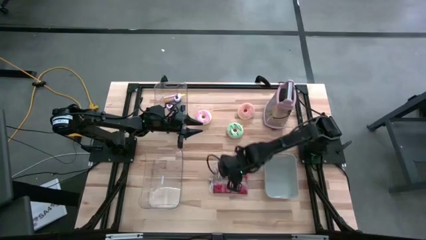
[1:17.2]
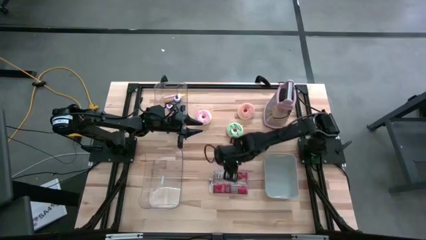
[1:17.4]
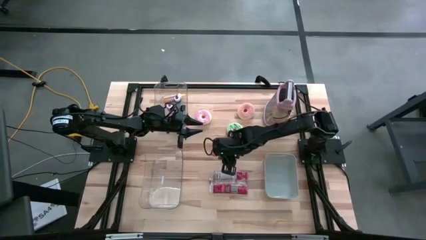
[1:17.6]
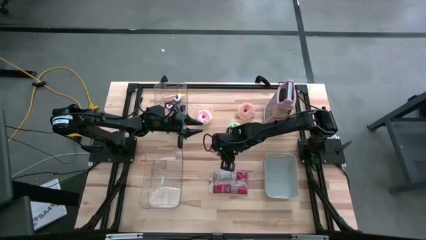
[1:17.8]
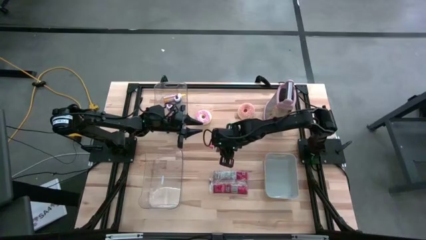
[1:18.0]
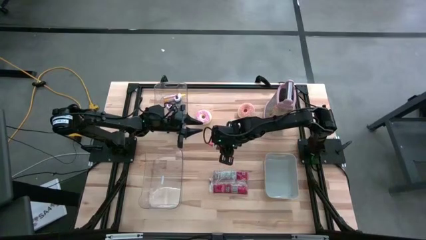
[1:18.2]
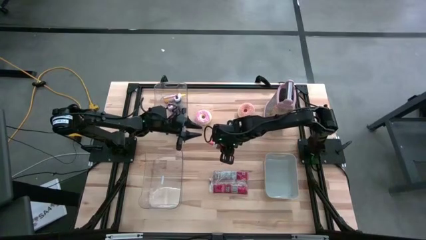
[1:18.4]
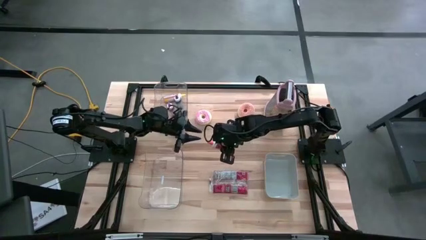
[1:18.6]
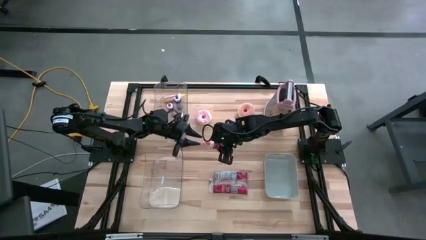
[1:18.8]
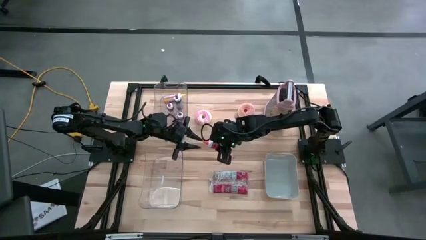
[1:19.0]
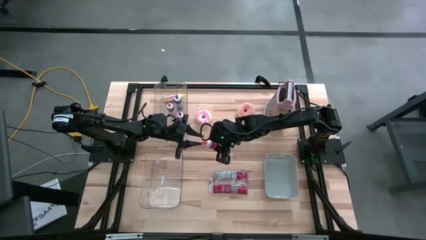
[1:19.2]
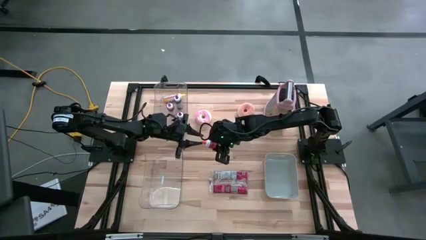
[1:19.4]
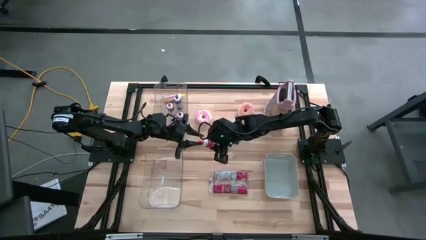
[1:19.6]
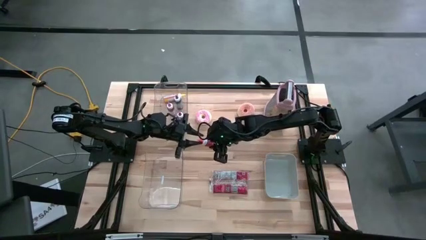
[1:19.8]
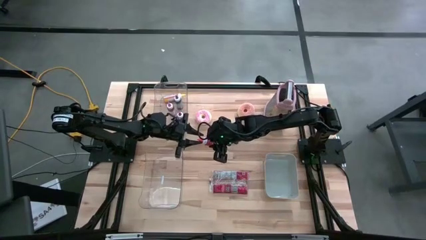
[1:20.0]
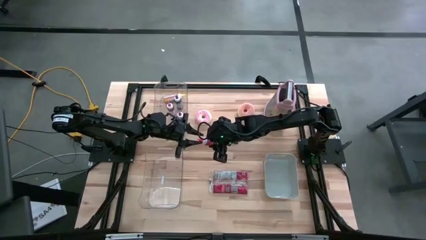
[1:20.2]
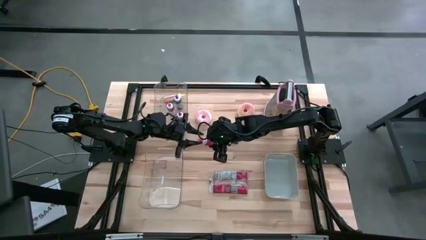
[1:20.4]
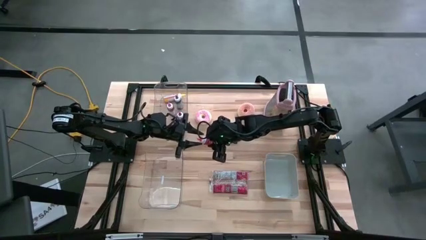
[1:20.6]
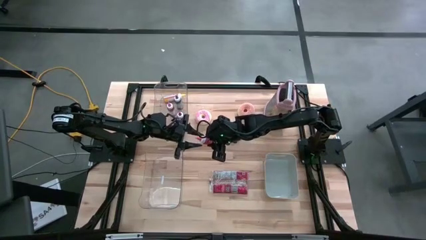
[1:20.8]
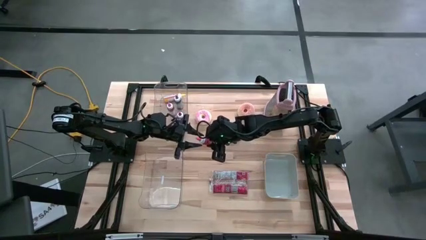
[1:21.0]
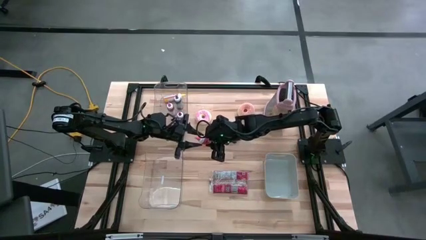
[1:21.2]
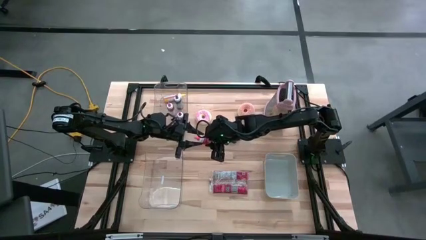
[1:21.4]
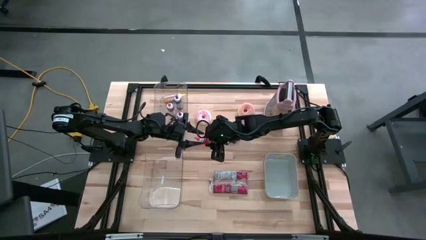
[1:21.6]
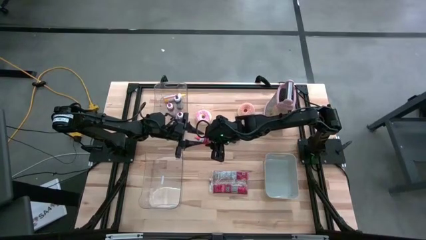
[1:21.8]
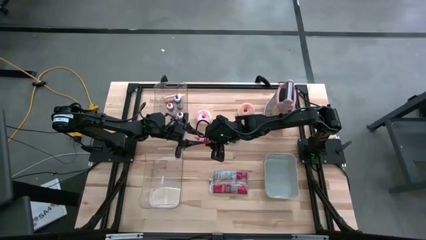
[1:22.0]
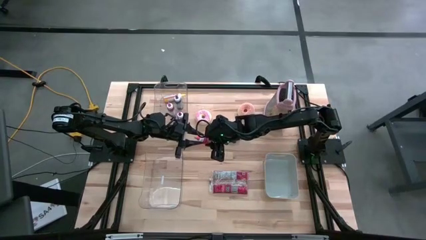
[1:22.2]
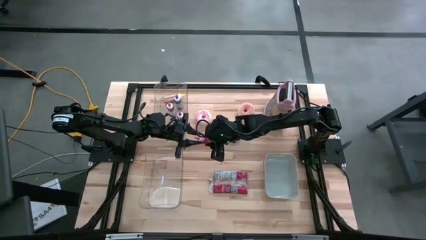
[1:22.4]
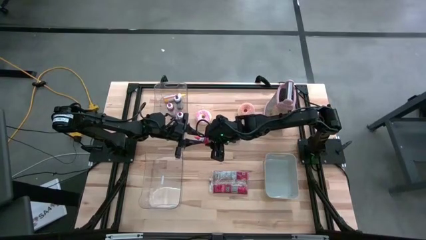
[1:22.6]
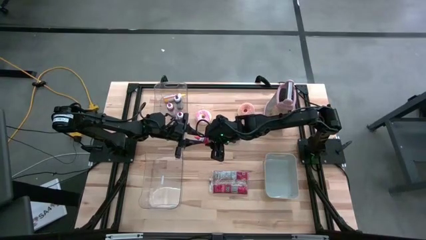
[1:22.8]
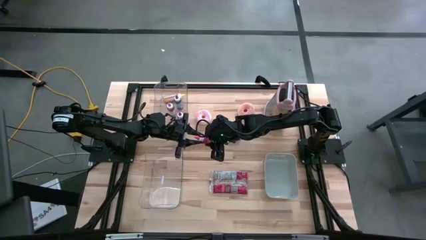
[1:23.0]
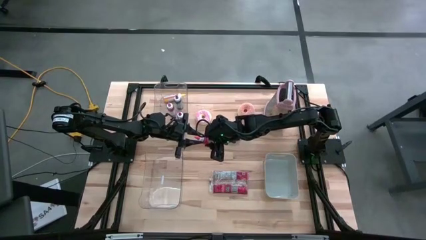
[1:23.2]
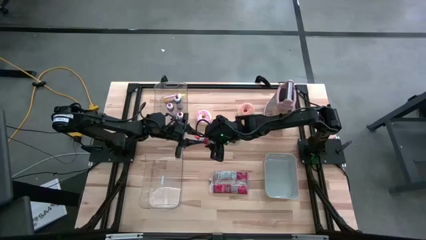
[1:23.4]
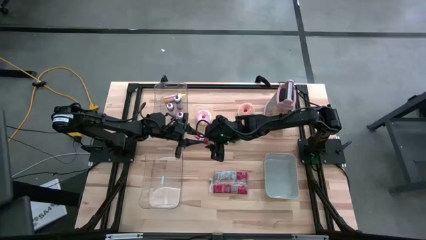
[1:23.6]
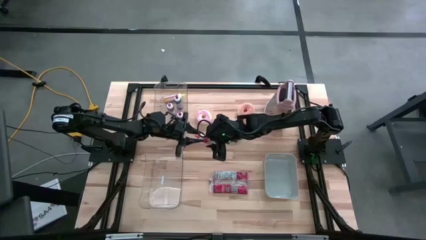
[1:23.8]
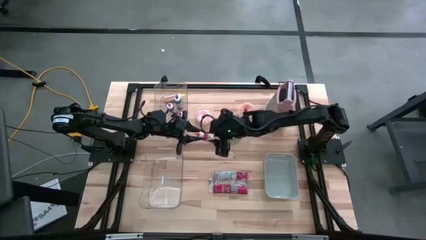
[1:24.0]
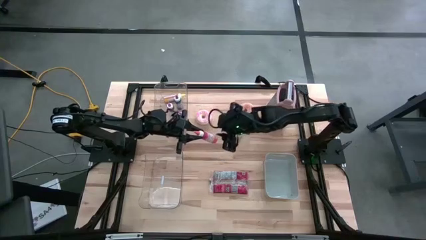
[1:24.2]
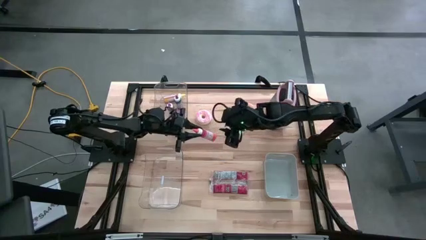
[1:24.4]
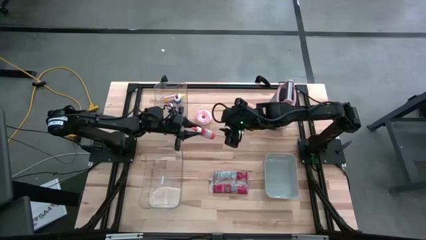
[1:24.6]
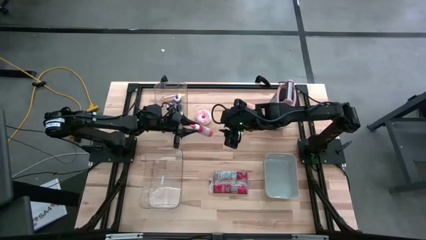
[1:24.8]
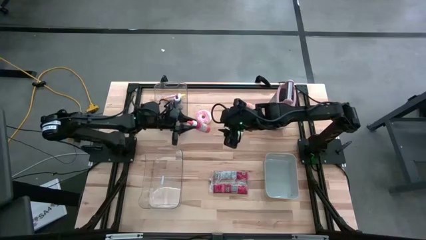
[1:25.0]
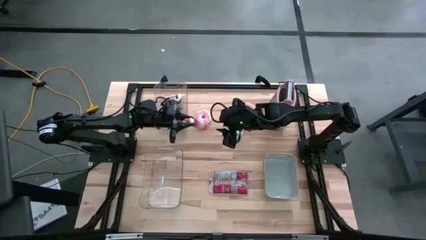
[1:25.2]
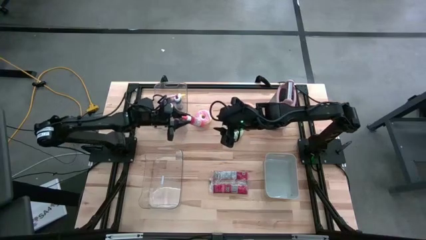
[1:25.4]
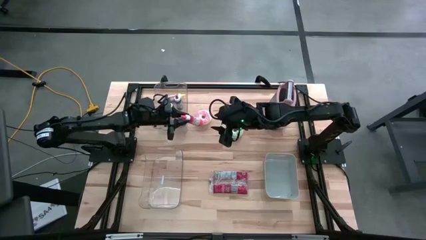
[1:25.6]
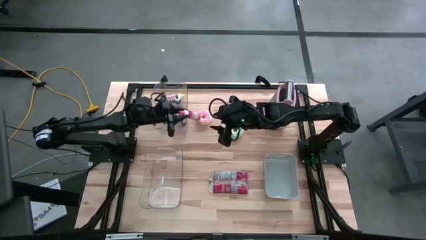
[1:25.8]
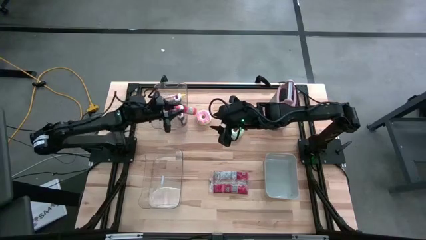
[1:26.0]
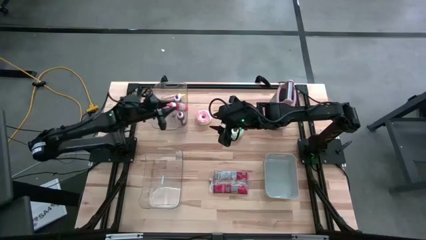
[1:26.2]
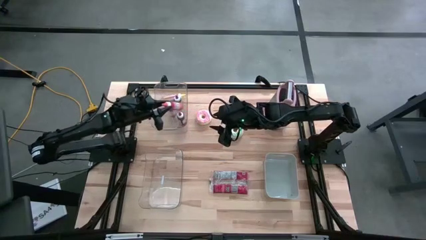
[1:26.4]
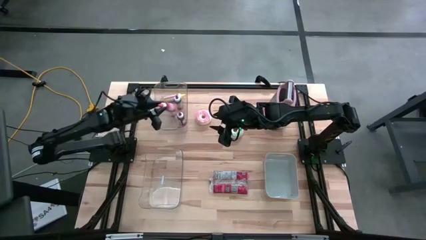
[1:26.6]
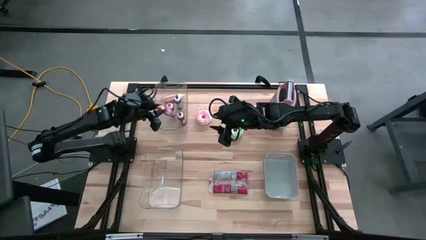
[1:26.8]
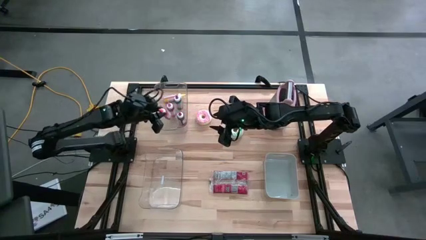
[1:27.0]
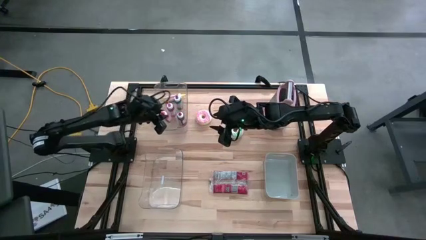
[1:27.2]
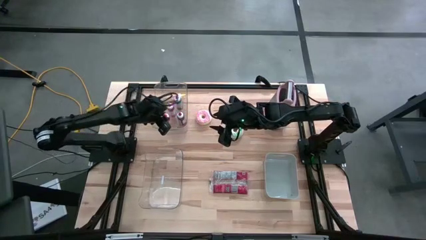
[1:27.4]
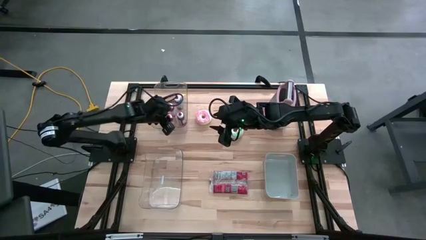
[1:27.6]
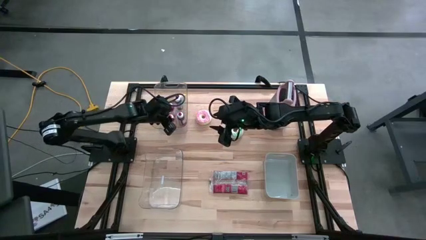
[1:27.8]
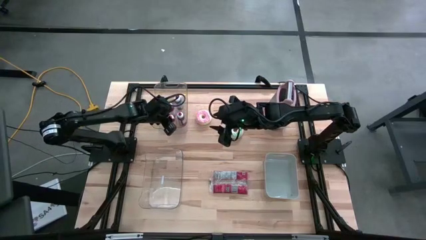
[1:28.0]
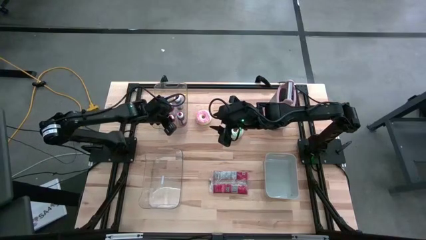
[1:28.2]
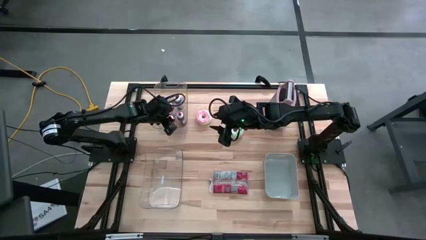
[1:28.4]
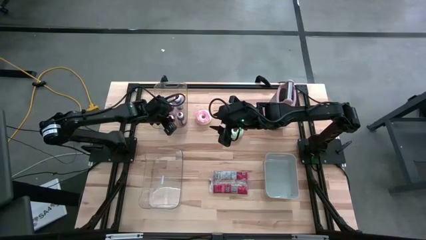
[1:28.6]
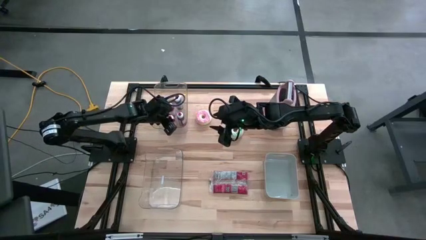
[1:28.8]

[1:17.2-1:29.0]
Put the orange food coloring bottle into the top transparent bin
